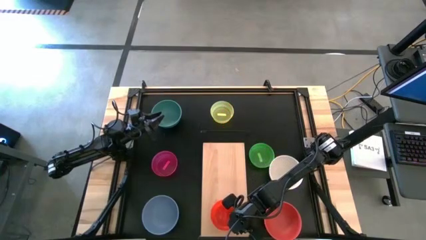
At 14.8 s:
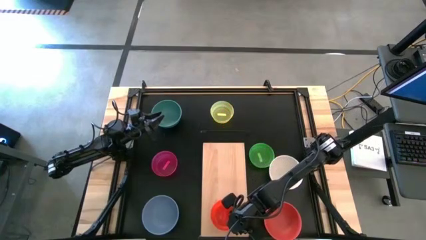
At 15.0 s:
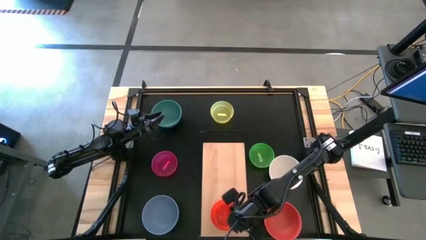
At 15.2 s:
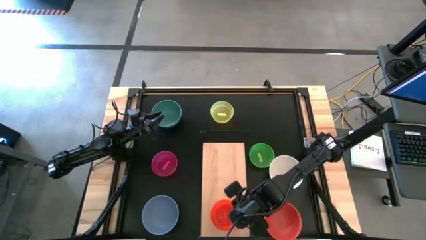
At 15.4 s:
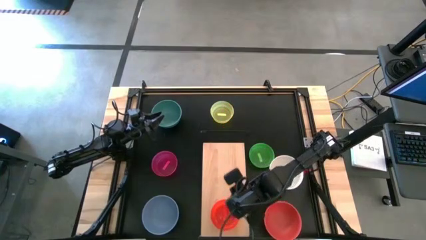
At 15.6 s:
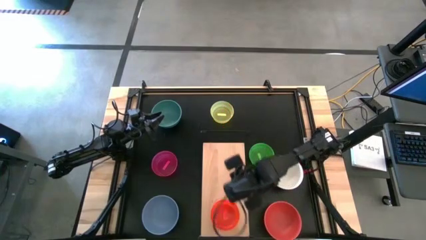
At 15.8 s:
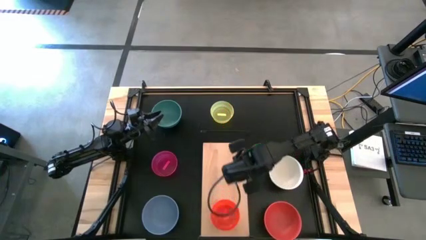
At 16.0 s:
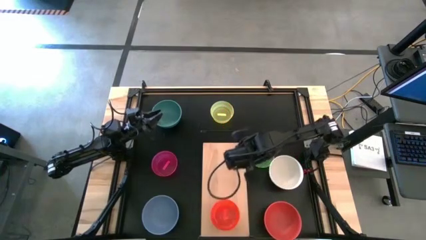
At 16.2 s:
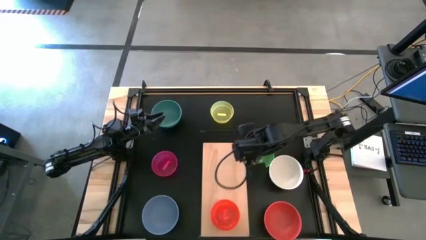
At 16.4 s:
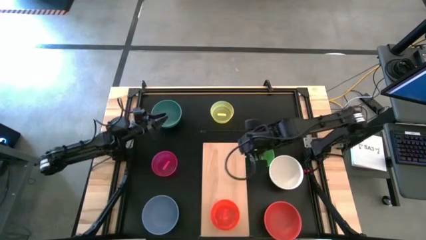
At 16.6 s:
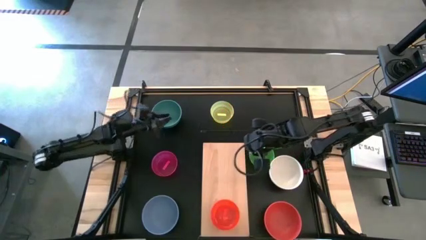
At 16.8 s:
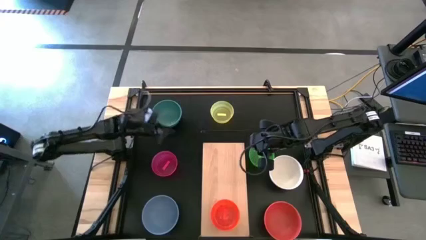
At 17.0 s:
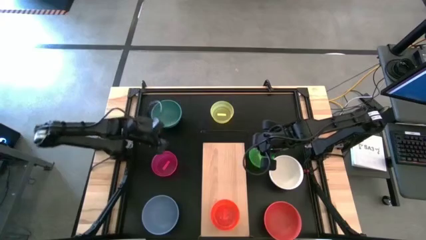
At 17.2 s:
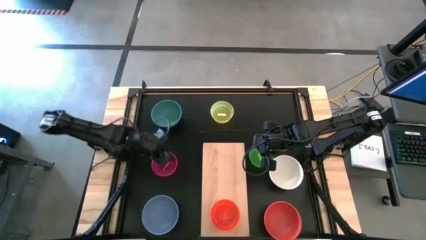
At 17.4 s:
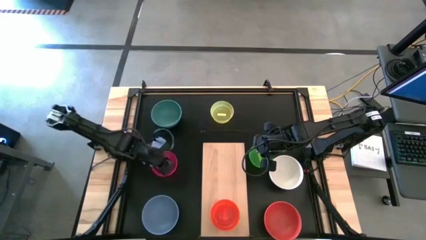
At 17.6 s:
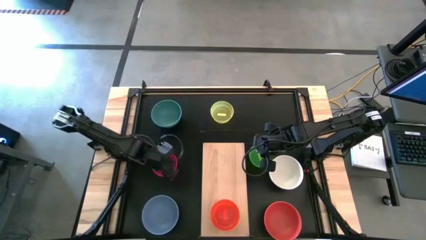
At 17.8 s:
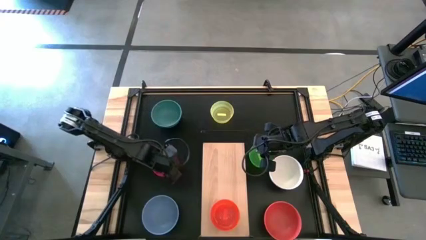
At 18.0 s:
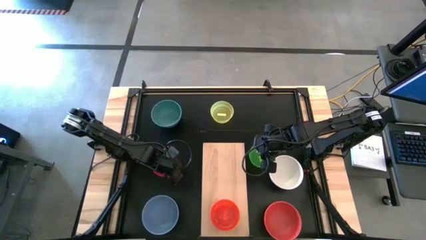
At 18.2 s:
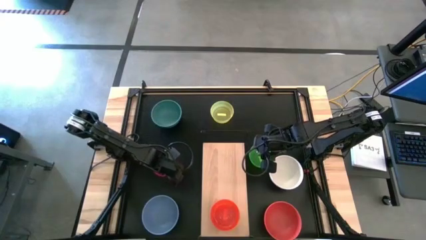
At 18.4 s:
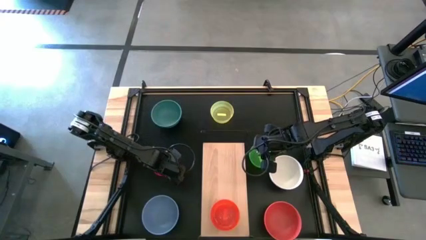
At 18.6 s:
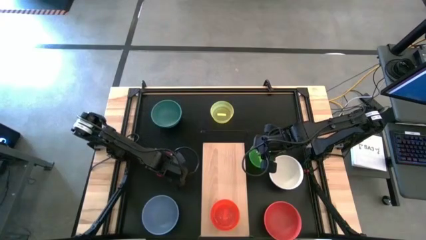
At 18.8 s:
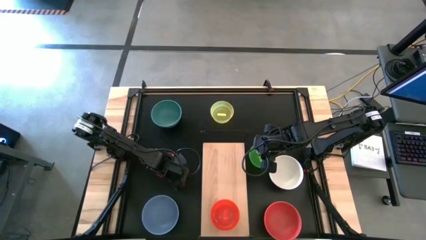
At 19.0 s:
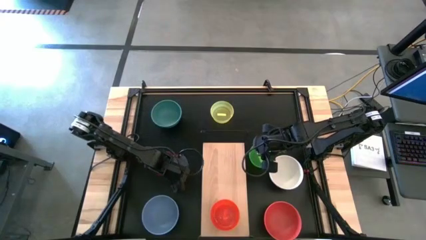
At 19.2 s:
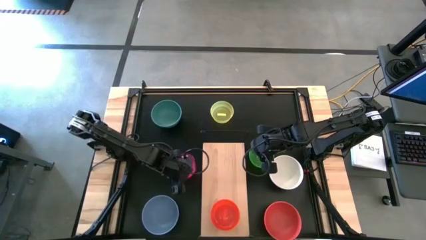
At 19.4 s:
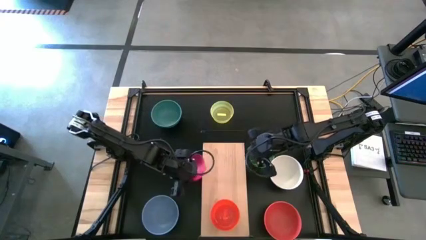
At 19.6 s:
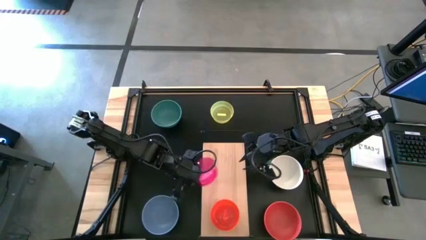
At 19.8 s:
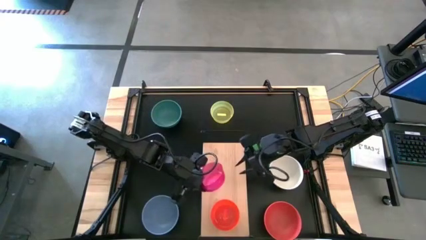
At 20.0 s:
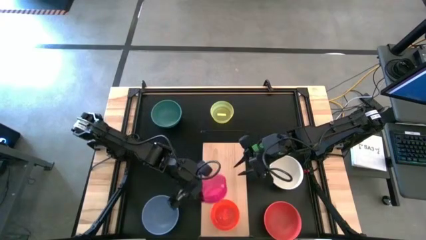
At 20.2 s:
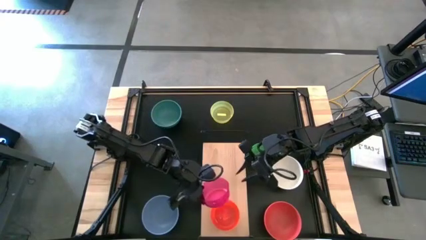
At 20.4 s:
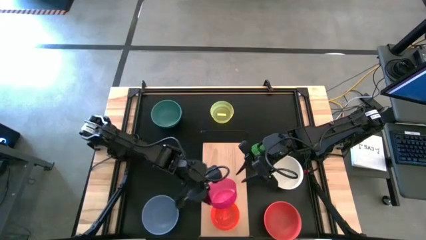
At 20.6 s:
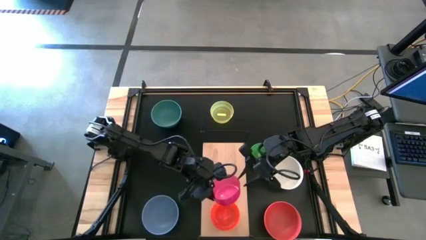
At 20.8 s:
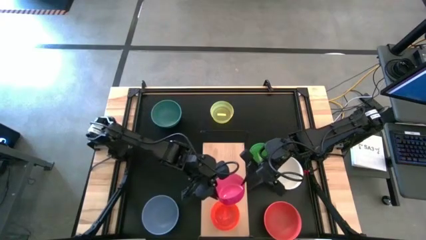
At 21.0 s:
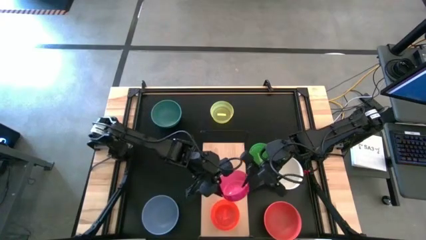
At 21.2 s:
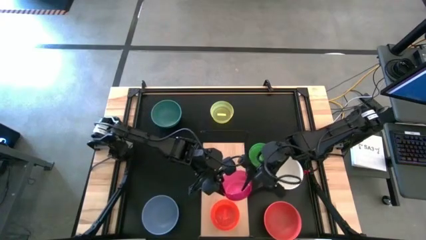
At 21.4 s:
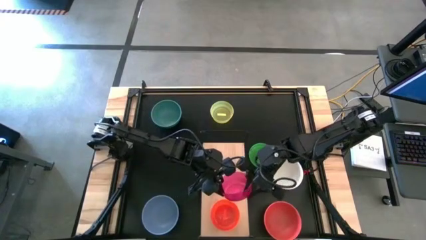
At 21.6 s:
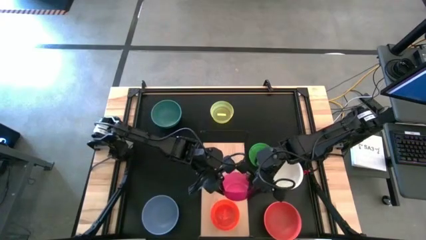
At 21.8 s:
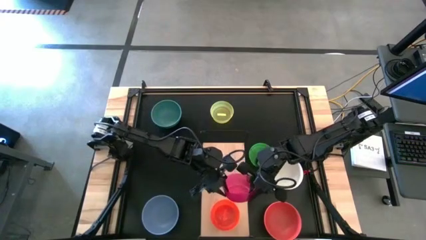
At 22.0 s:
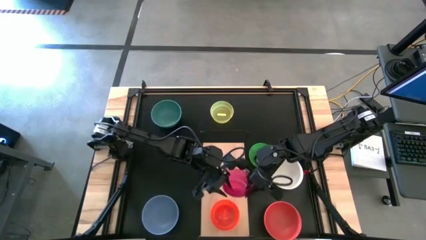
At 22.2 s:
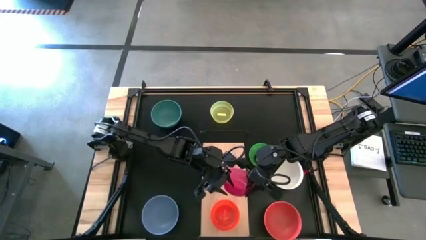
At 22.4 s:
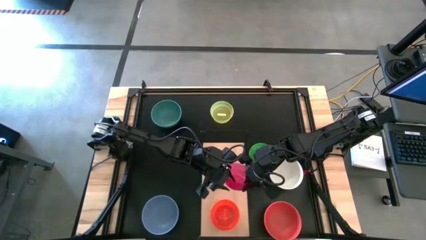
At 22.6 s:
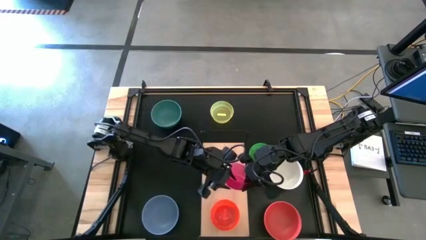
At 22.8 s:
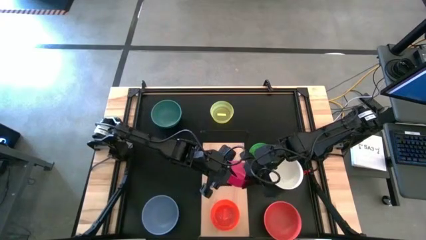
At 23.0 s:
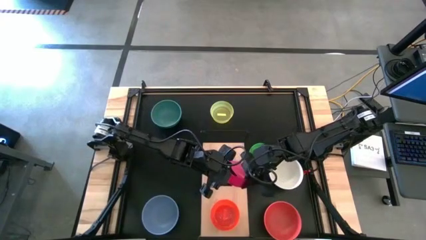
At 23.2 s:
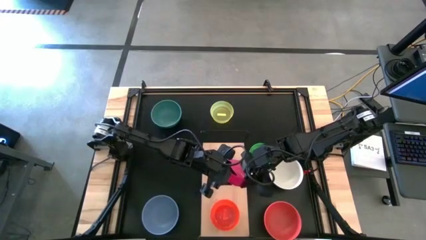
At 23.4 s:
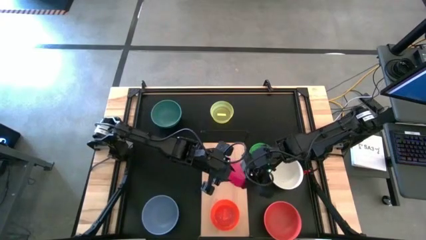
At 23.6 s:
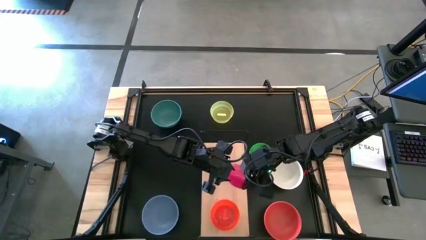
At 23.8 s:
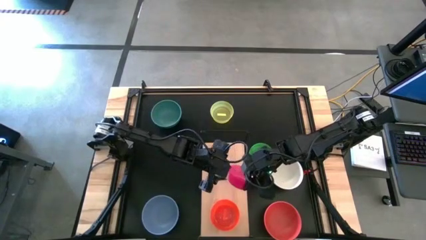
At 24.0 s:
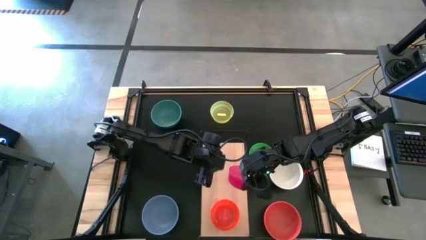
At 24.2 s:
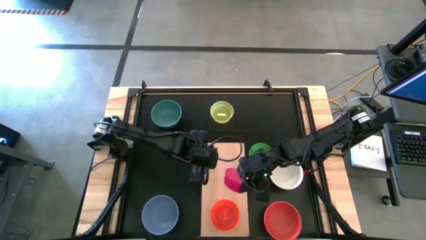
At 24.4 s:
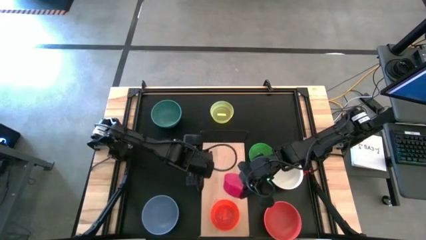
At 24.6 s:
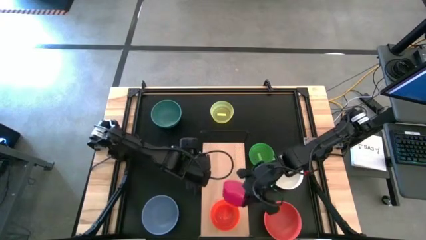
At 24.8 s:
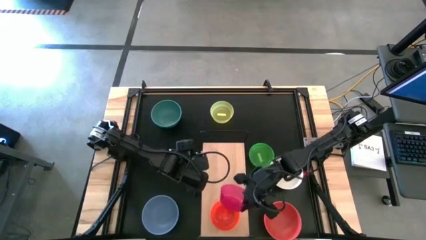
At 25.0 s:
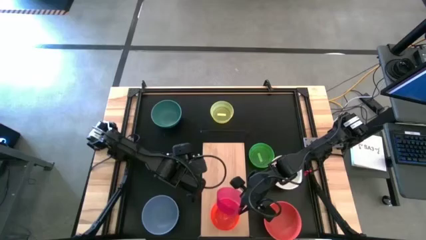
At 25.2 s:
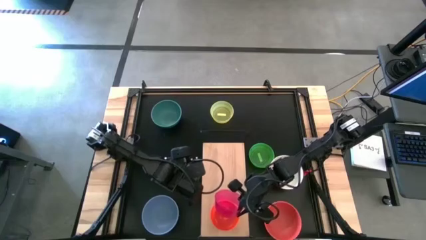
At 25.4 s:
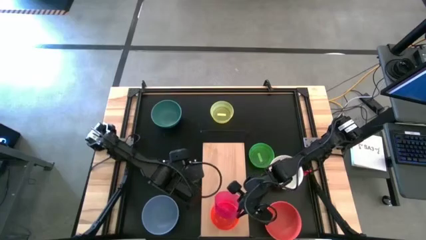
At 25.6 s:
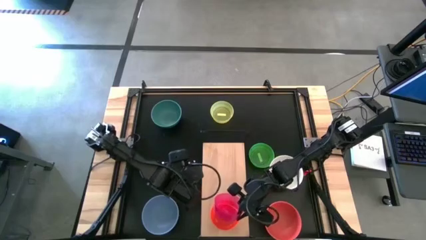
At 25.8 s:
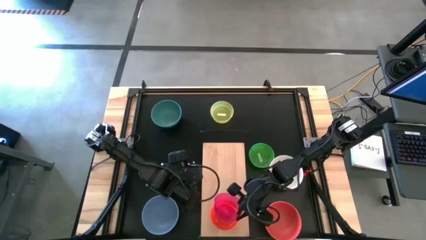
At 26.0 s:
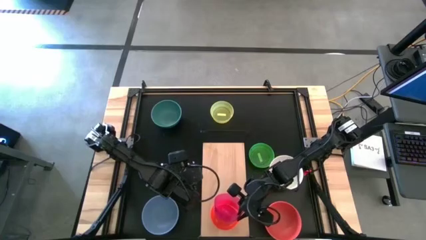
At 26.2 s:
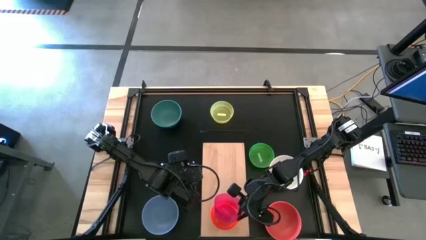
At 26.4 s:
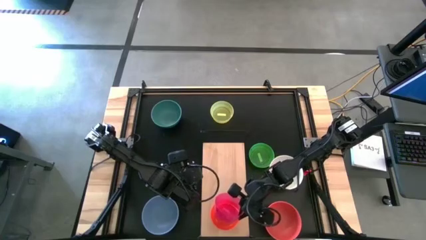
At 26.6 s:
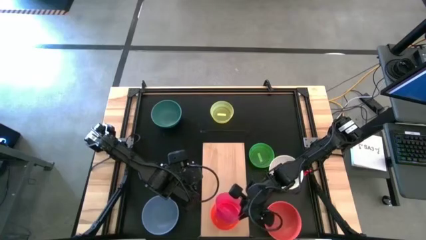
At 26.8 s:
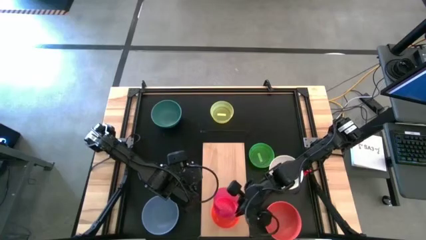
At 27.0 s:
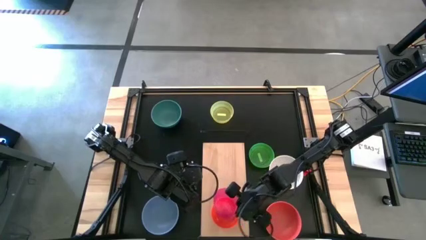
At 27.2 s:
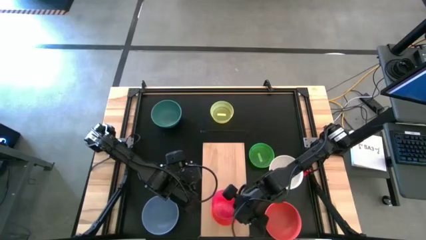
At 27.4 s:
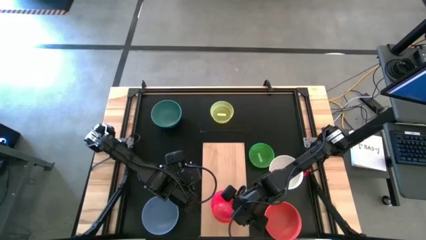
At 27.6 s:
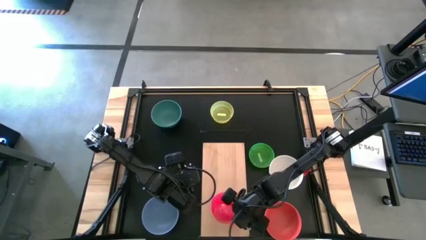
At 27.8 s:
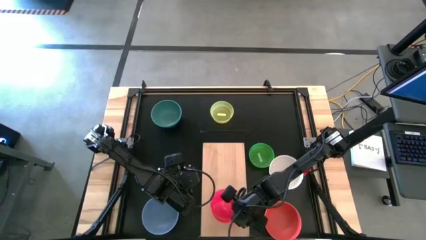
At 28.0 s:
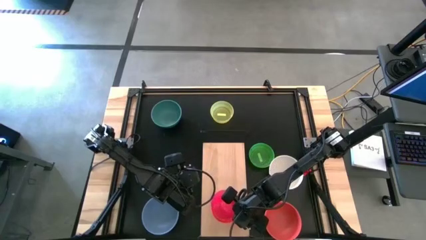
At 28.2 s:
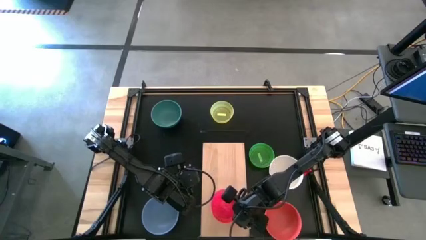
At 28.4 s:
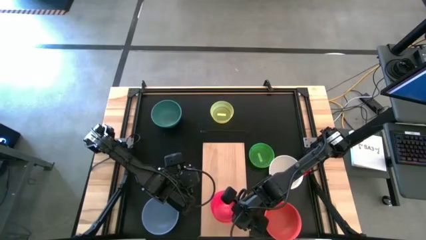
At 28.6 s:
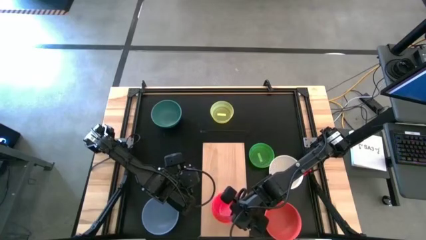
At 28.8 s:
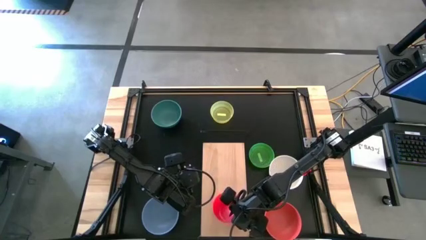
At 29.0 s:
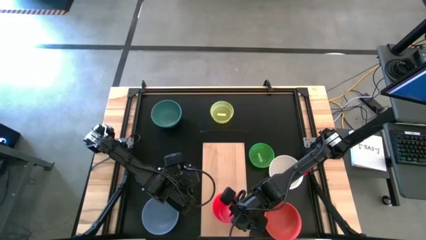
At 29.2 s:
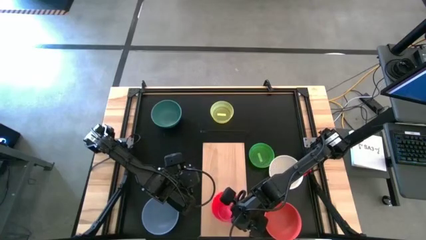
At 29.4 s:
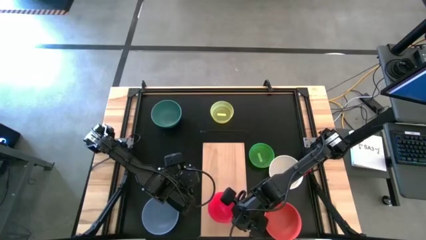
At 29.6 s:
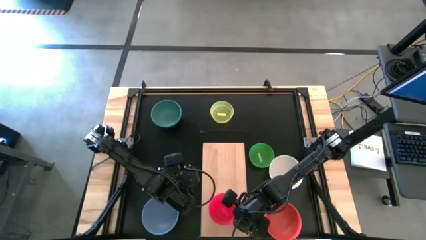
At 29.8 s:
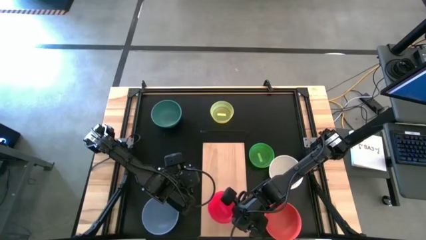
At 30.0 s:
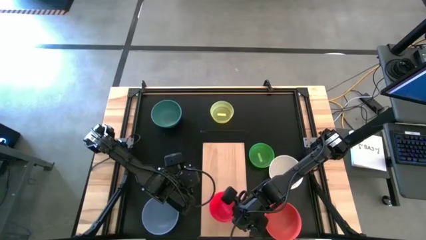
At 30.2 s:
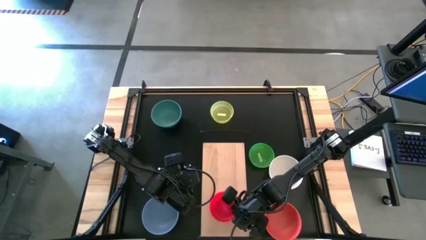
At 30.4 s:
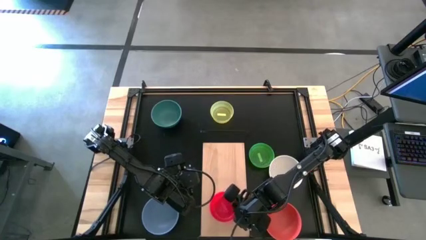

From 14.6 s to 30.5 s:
Task: Place and stack bowls onto a shelf
Stack the small pink bowl on top of the small orange bowl on the shelf
